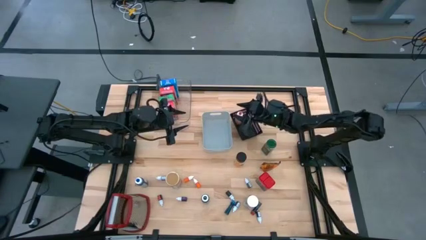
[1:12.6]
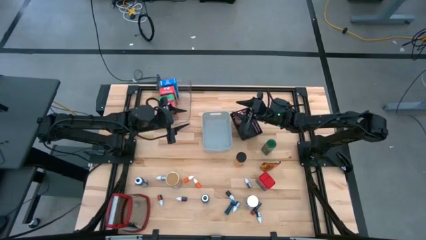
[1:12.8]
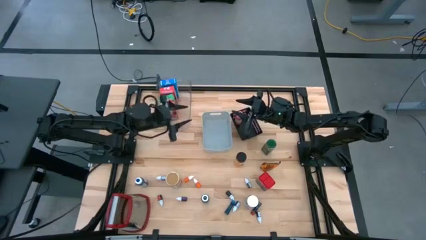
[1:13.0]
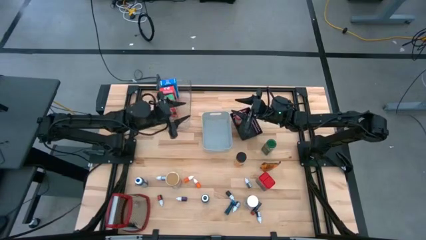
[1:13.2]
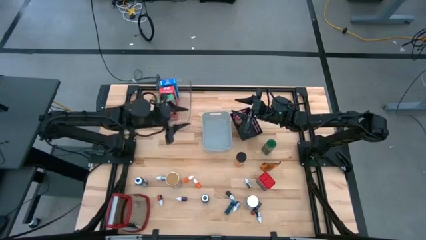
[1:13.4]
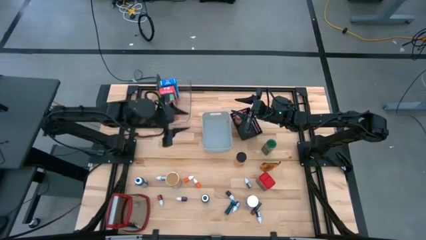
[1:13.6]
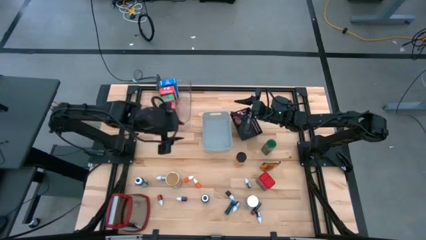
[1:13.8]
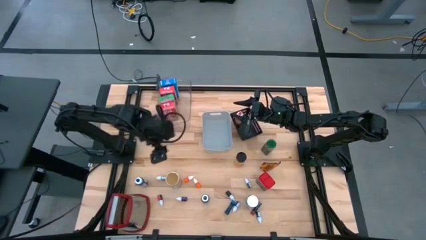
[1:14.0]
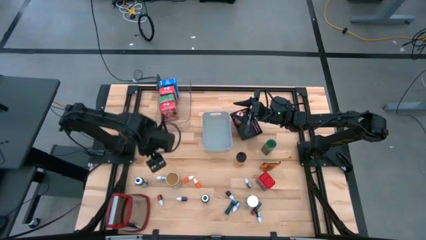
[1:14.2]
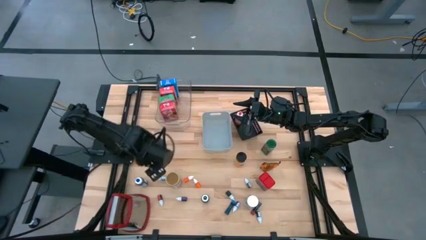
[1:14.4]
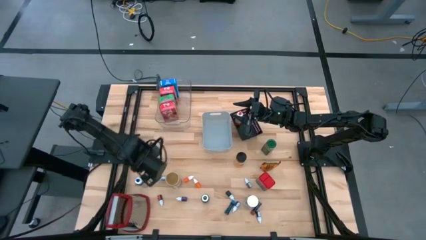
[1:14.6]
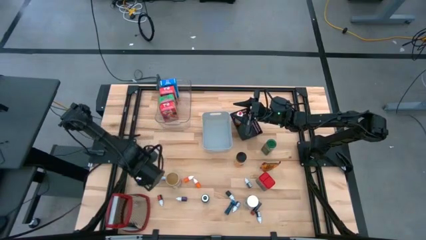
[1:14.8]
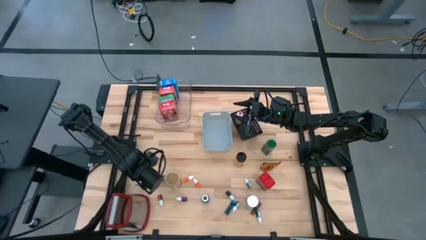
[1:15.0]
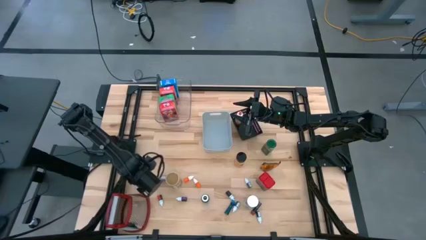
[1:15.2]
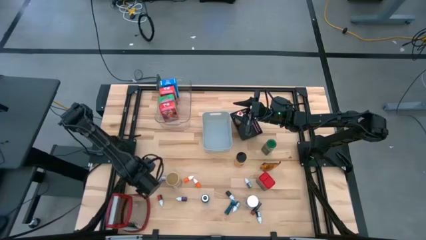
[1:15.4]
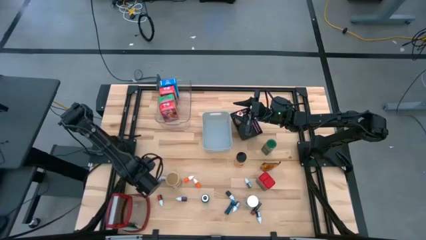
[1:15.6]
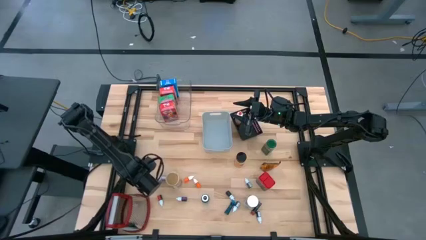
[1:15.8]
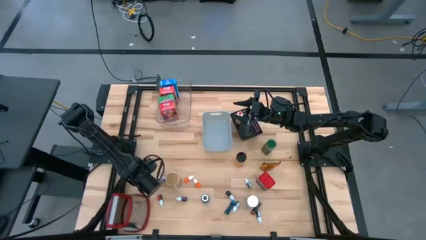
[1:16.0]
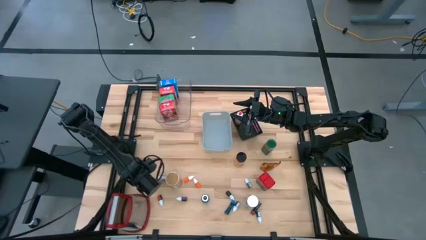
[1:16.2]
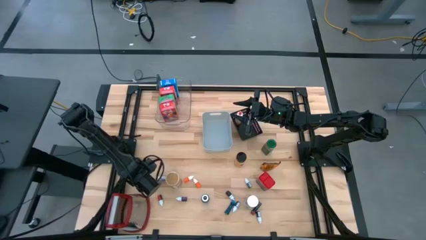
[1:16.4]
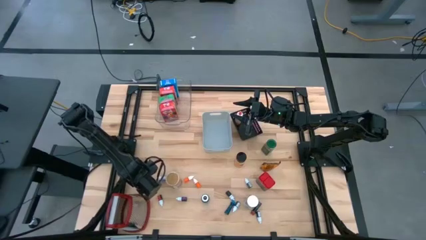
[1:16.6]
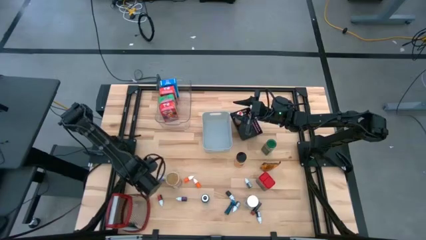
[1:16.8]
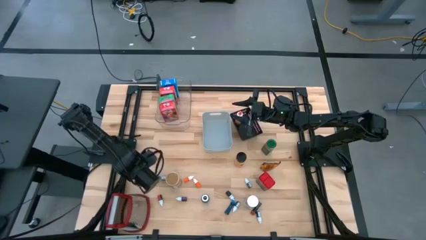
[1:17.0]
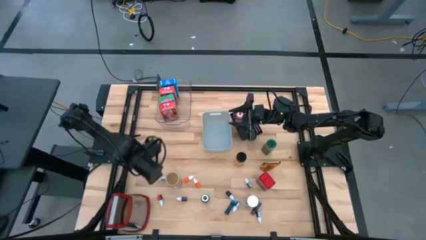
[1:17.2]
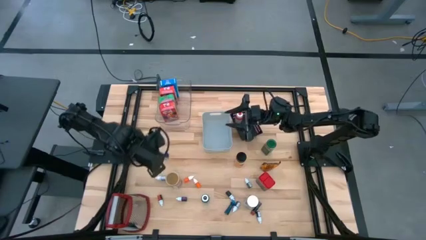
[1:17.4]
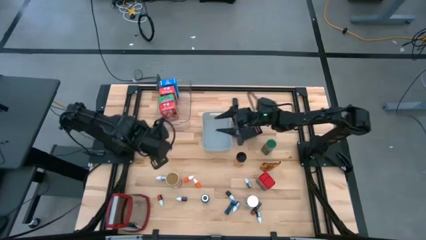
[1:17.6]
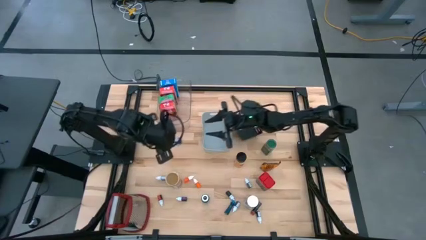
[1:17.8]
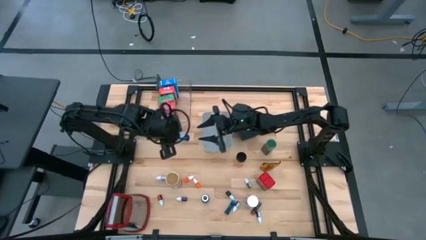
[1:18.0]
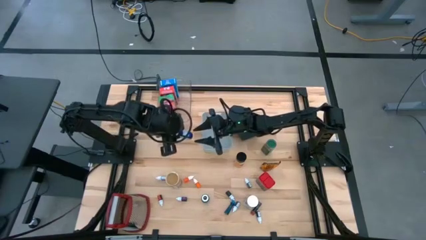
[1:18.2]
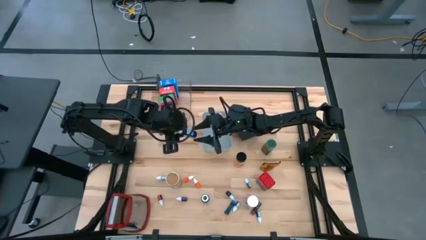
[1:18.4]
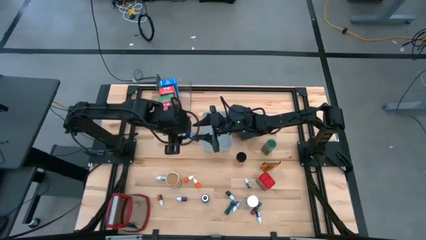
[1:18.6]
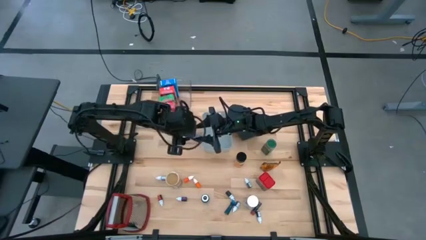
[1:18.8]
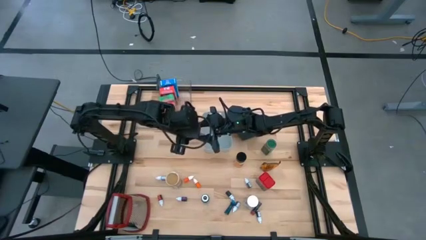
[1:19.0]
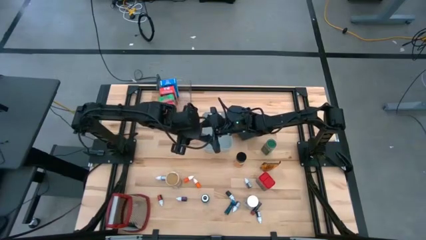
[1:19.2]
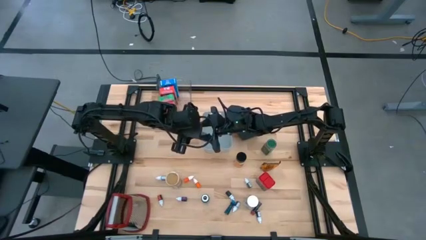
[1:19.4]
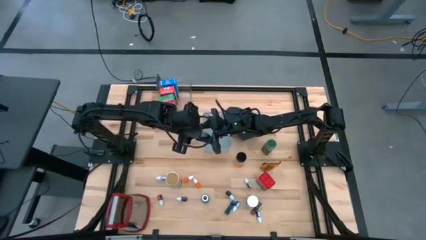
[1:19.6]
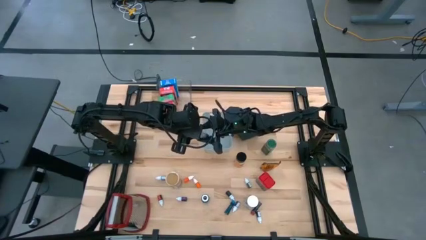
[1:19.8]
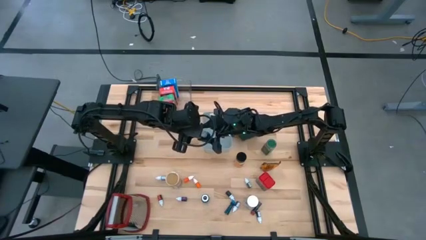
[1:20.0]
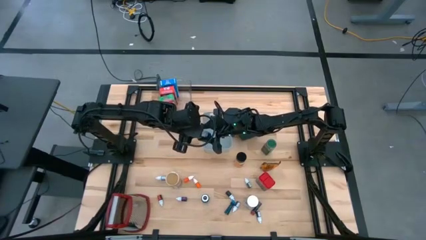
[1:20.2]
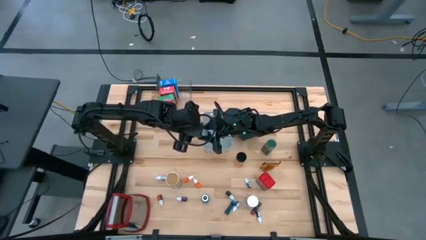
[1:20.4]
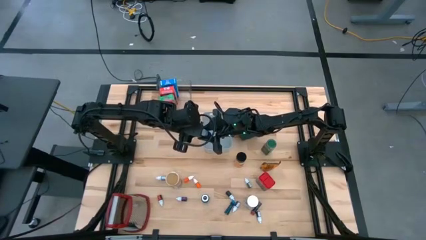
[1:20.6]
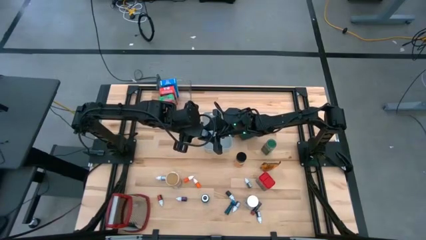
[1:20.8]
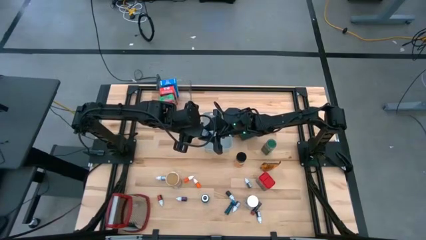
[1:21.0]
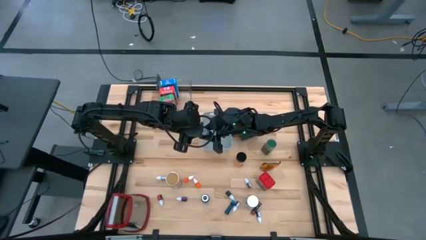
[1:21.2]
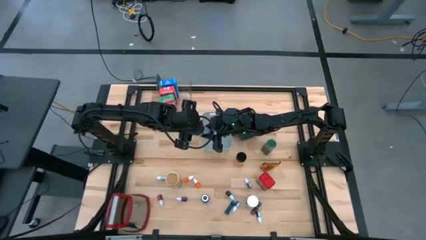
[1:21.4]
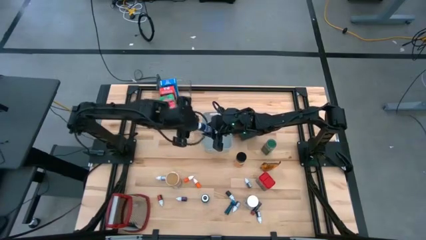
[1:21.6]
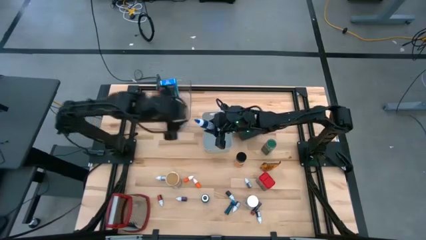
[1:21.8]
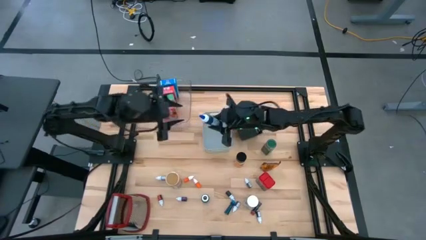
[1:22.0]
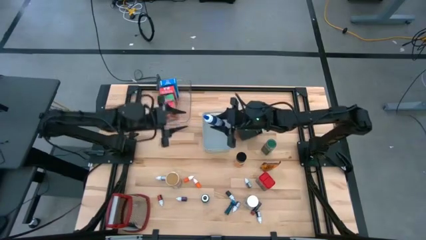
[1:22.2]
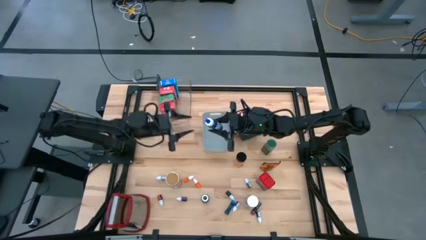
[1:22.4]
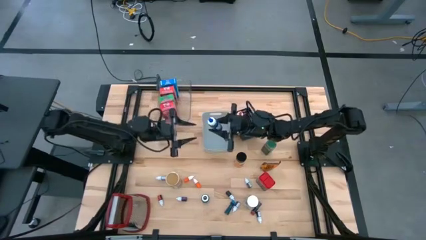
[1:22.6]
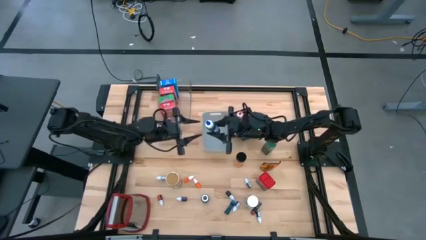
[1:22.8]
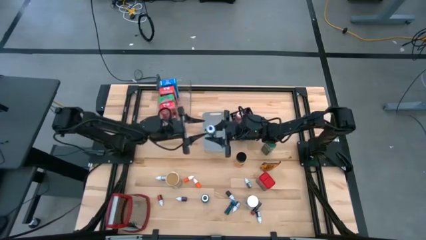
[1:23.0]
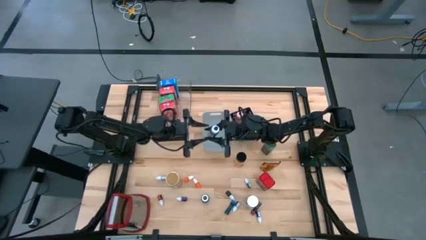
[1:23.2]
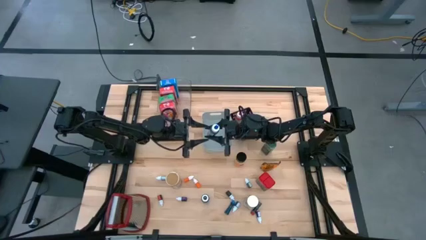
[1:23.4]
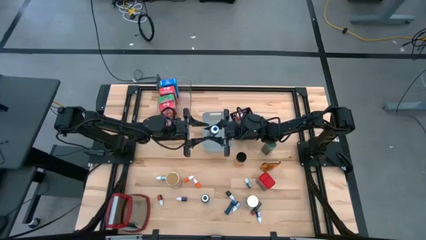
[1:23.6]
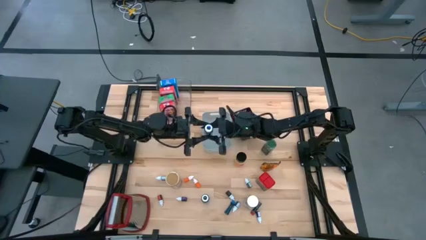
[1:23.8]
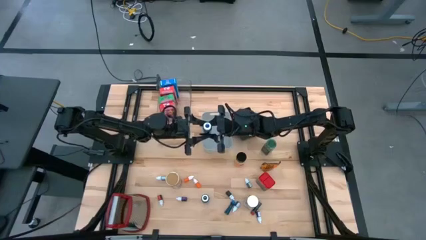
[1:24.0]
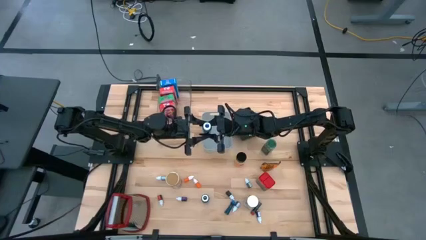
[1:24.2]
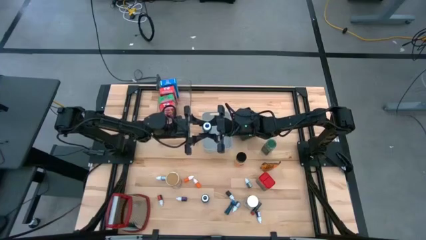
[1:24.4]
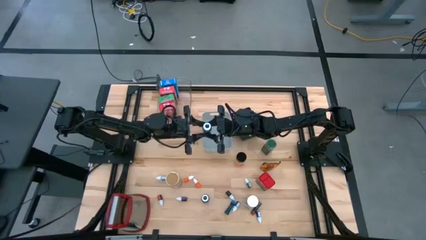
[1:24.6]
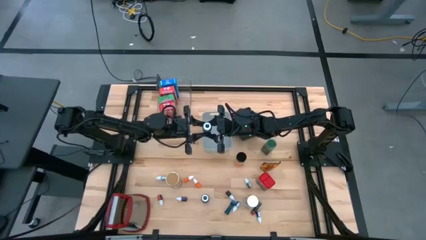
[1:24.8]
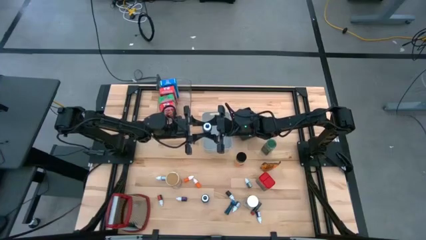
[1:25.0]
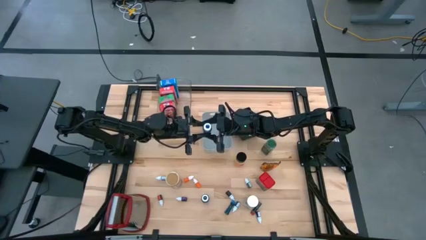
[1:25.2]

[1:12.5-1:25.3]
Task: Pick & Place Kitchen Items
Put the blue food coloring bottle into the black bin

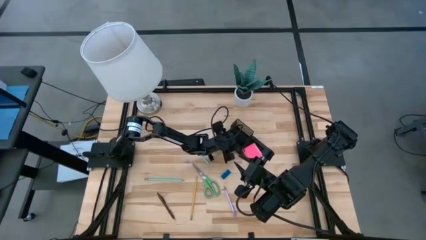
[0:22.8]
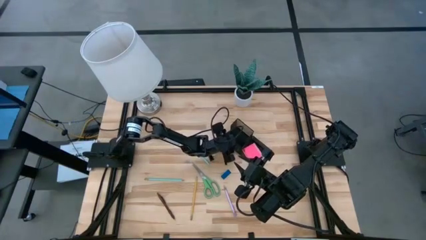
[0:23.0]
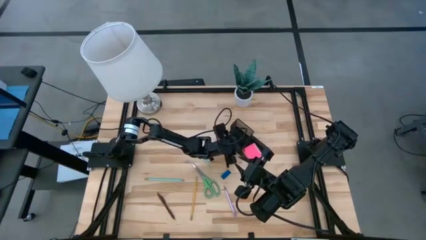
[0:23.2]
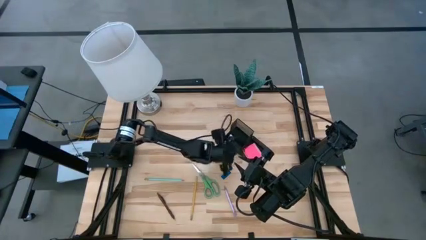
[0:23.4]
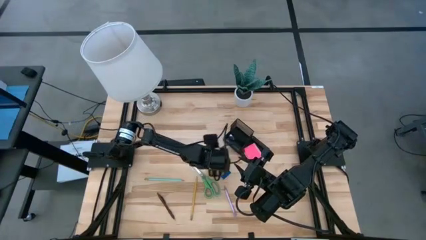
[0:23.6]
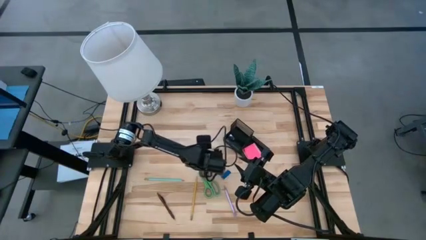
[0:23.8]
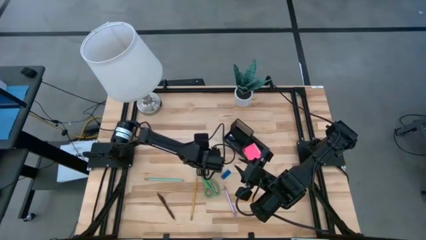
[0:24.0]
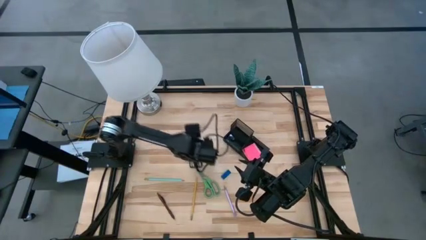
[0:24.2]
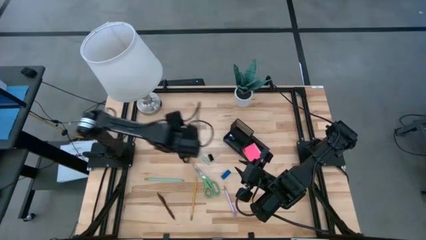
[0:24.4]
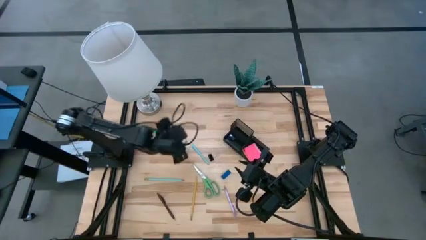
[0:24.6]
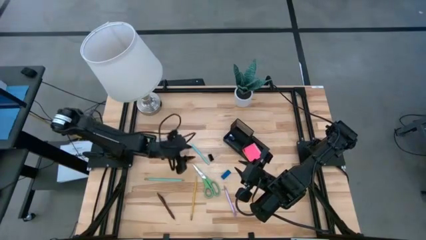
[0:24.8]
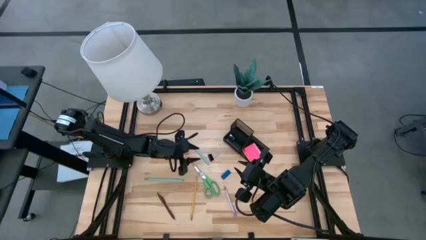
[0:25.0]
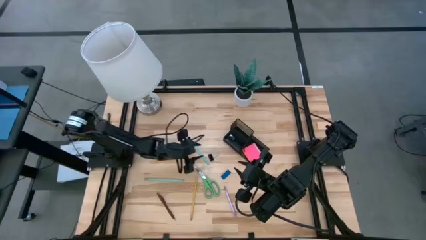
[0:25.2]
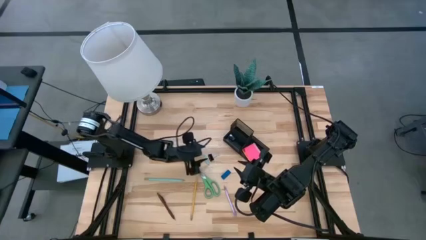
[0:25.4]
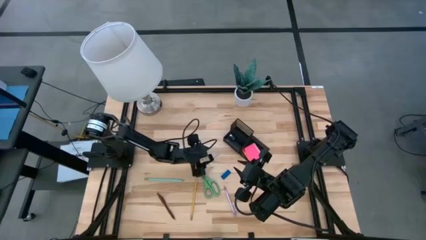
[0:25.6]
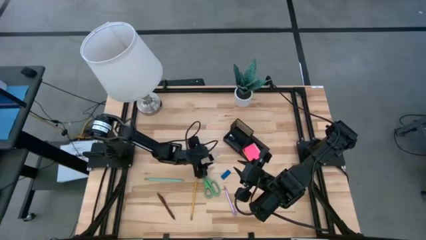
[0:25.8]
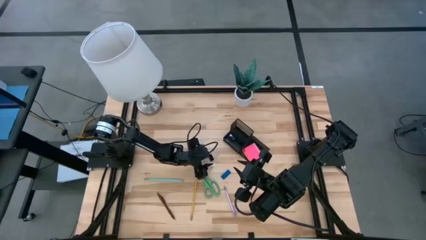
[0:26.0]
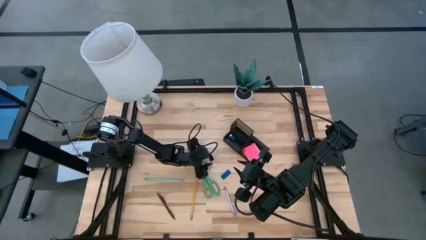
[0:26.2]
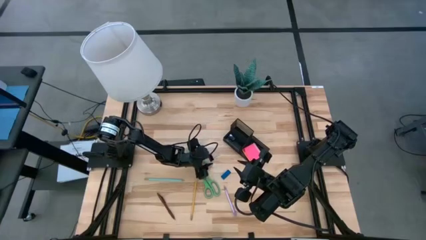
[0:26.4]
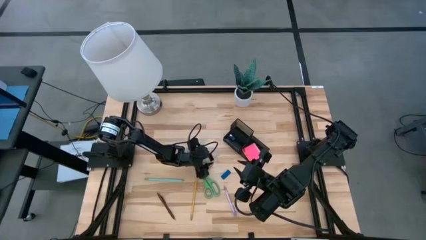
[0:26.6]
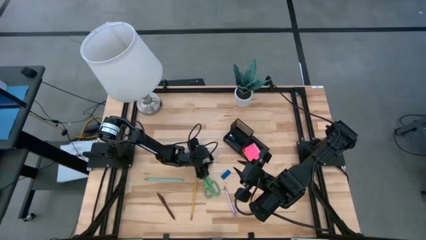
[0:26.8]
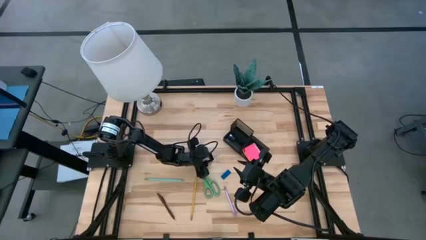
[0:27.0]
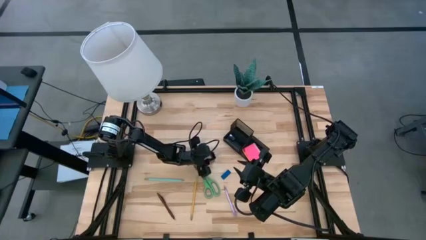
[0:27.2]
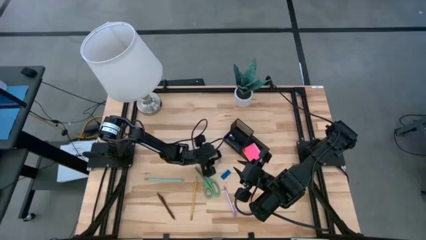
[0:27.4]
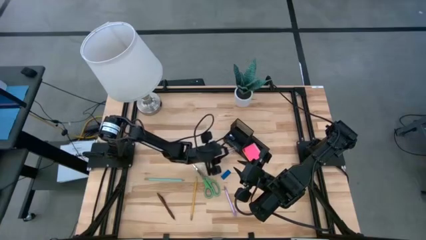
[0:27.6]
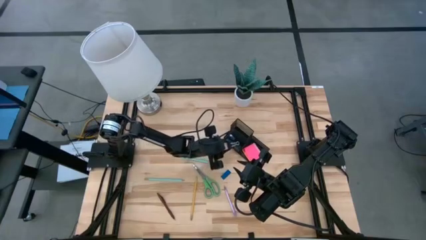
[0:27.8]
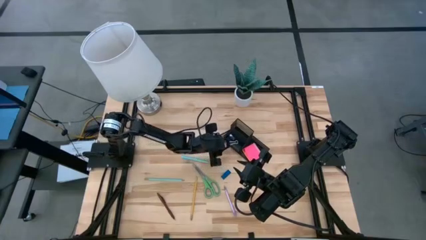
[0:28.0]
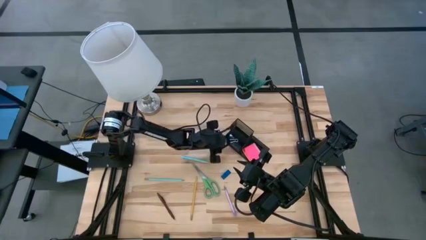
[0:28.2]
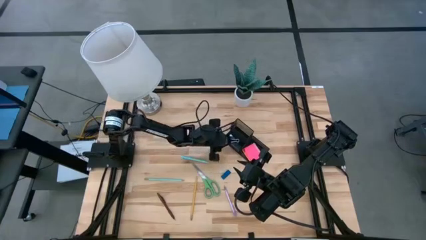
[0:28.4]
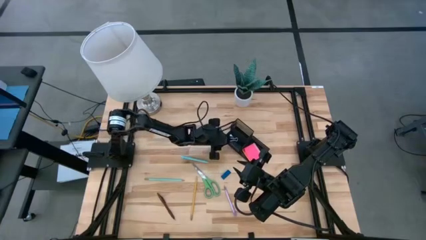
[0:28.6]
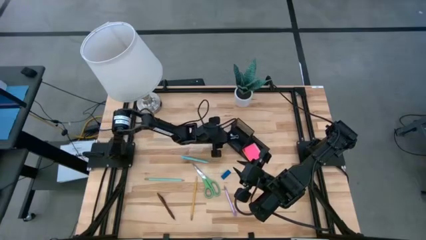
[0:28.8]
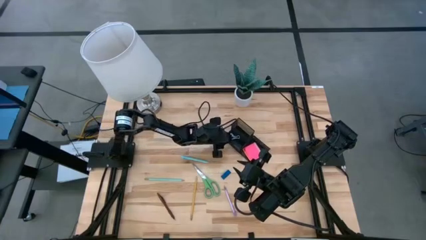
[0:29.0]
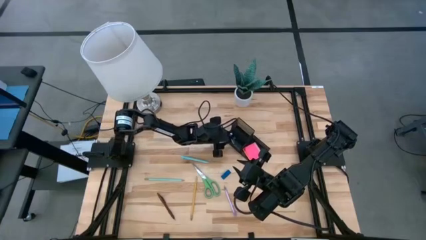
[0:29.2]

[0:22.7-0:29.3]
Task: Pick and place office supplies into organizer
Put the black binder clip into the desk organizer
